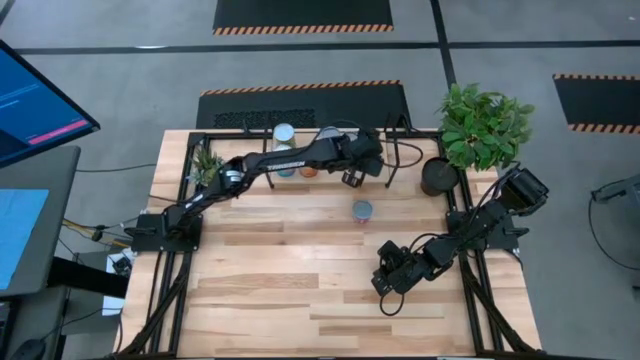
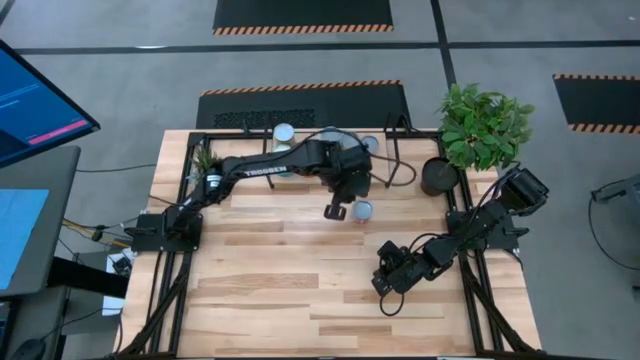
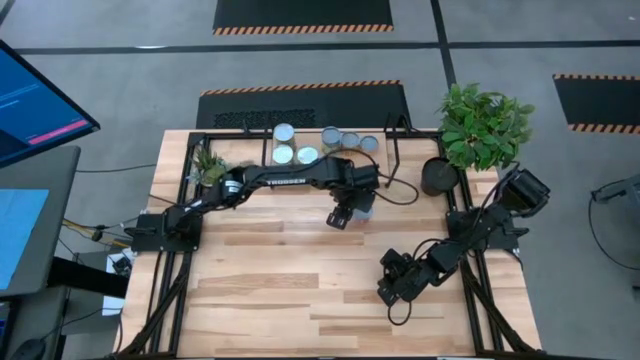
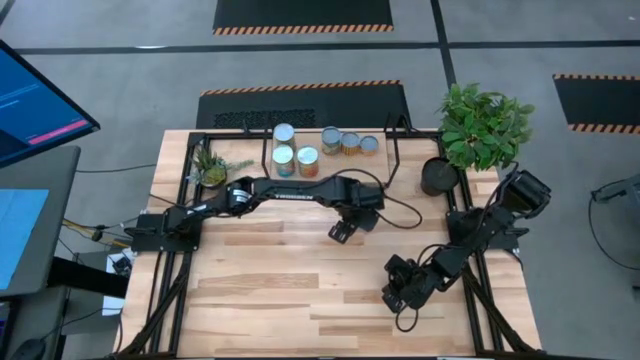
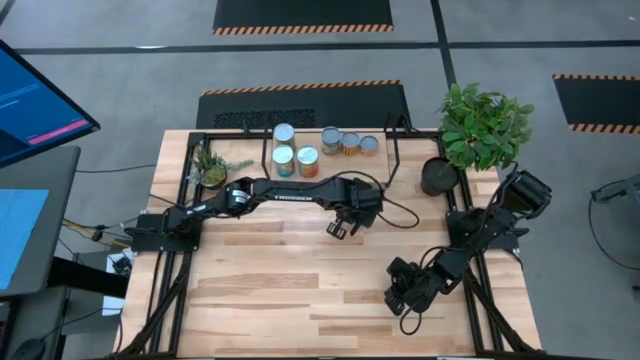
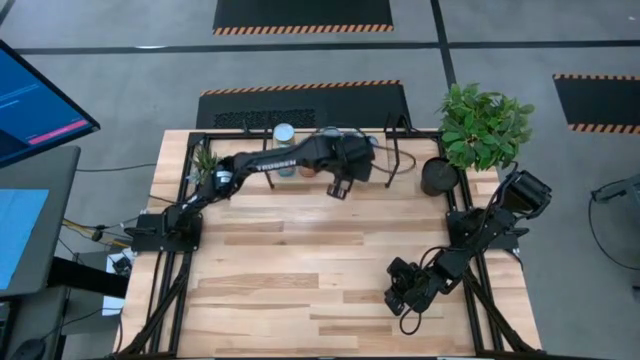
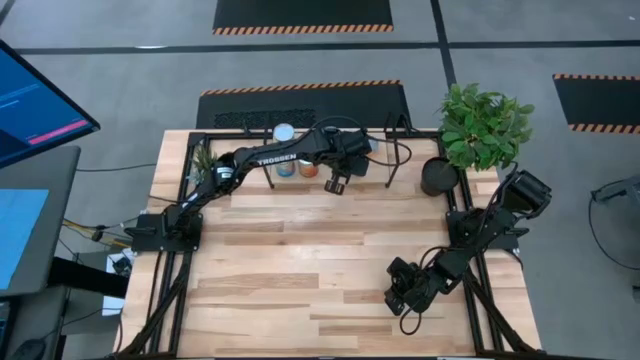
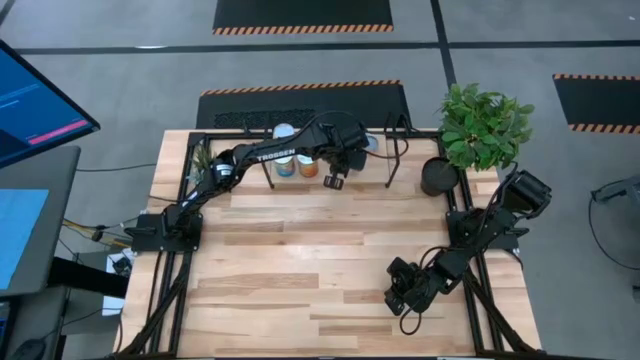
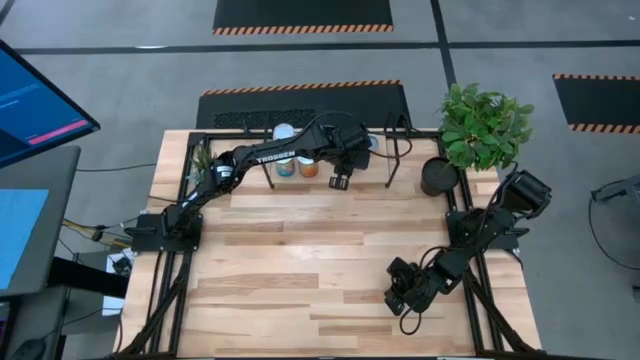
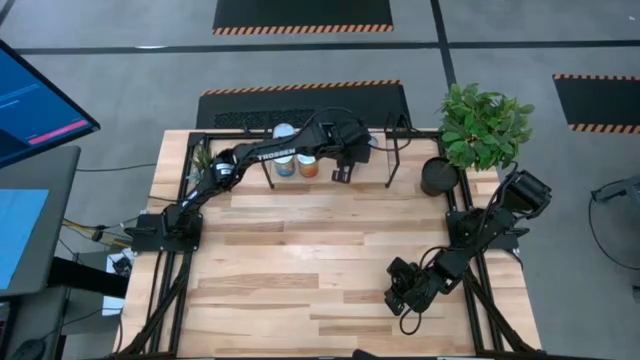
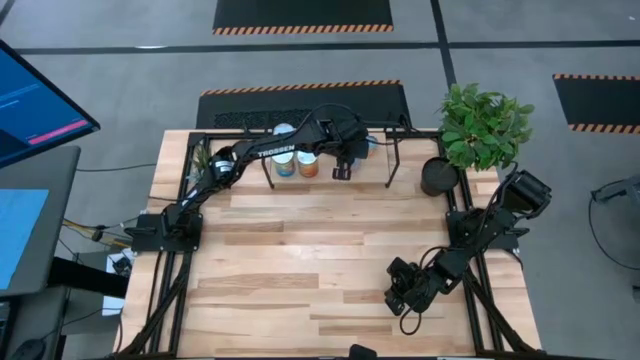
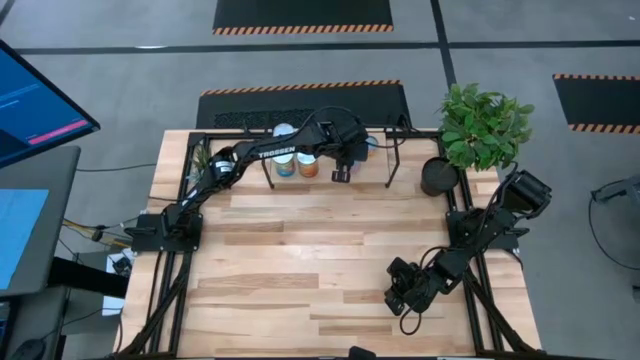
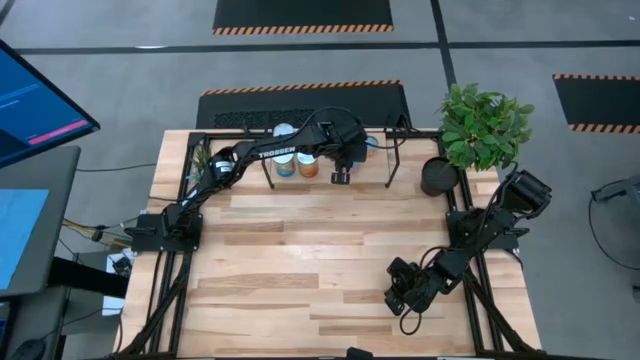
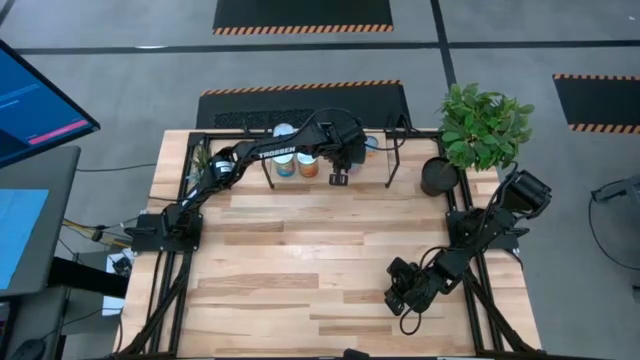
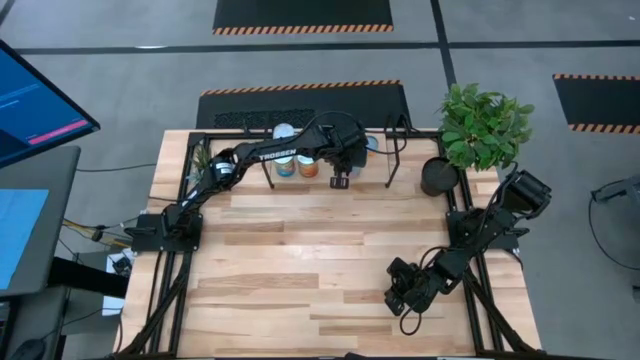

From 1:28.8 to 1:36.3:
Task: Pick and place cans onto a shelf
Put the canned corn on the shelf

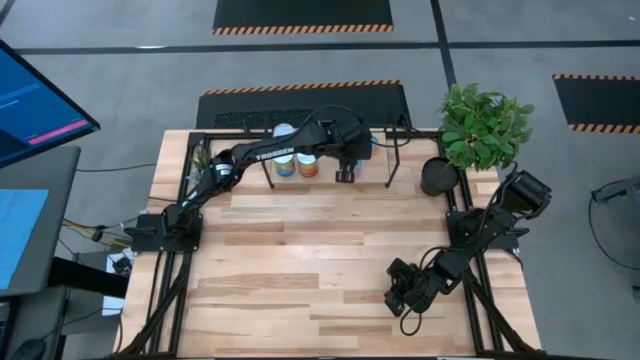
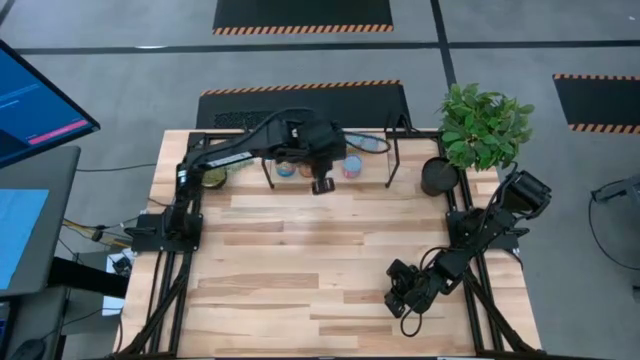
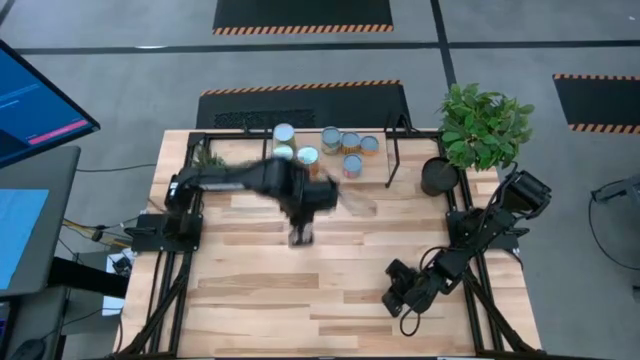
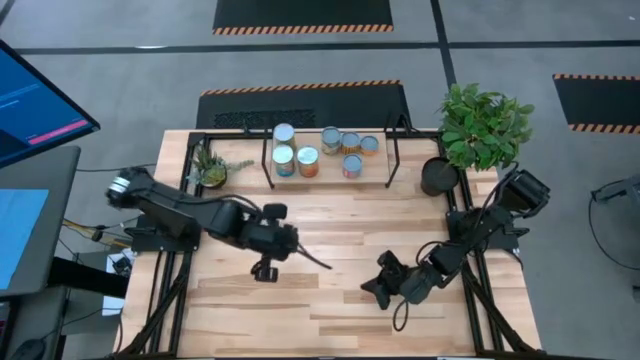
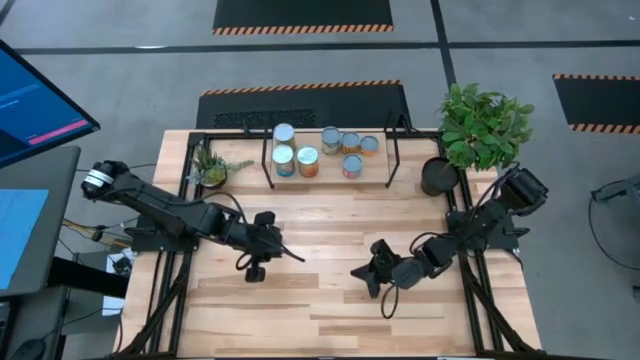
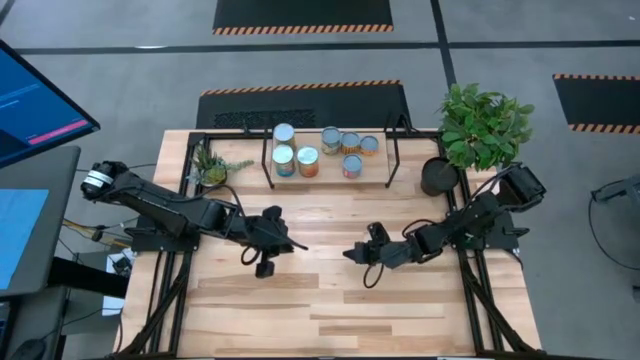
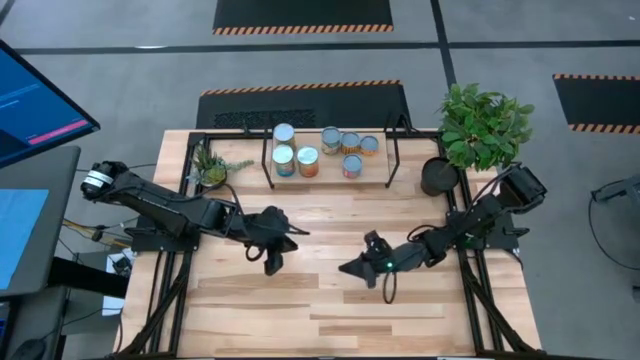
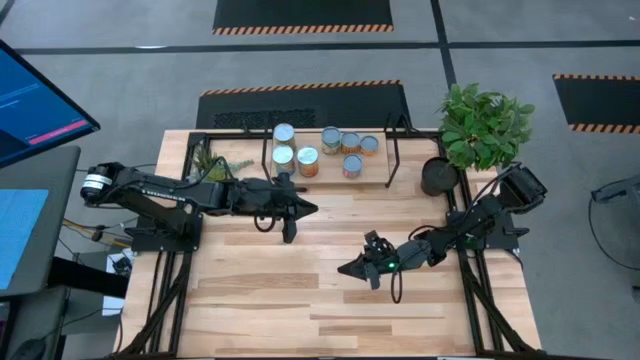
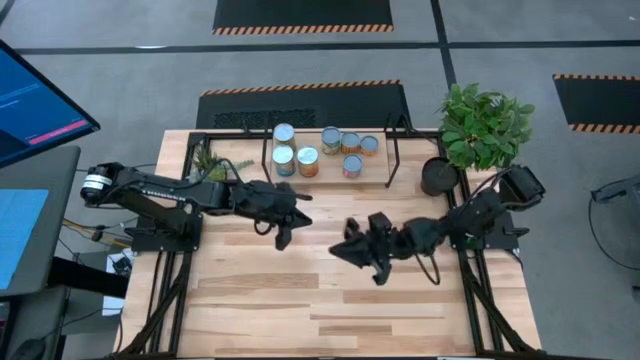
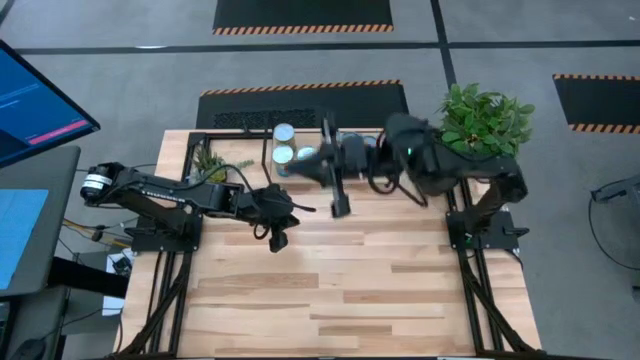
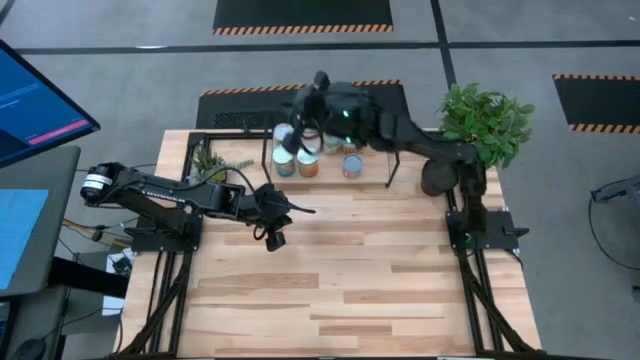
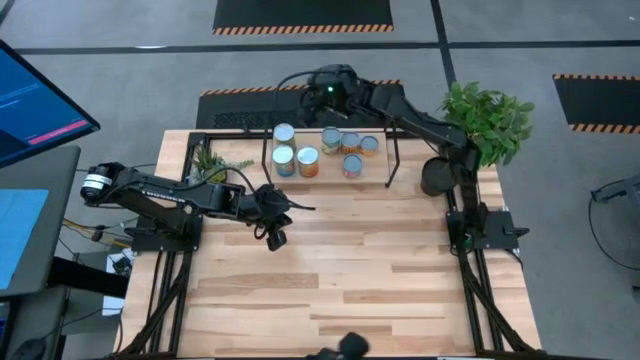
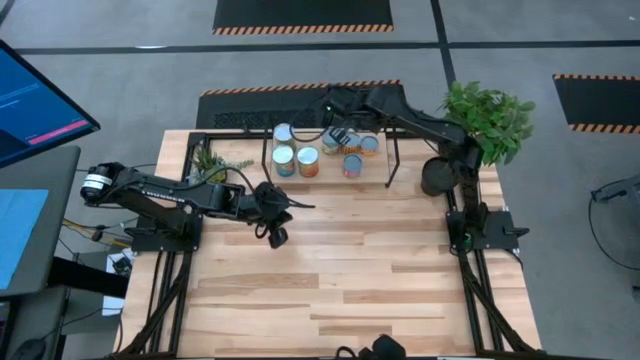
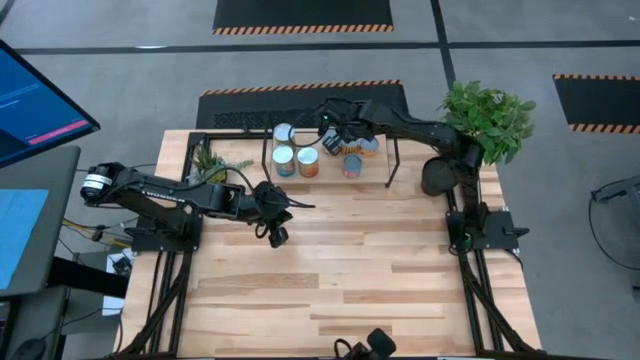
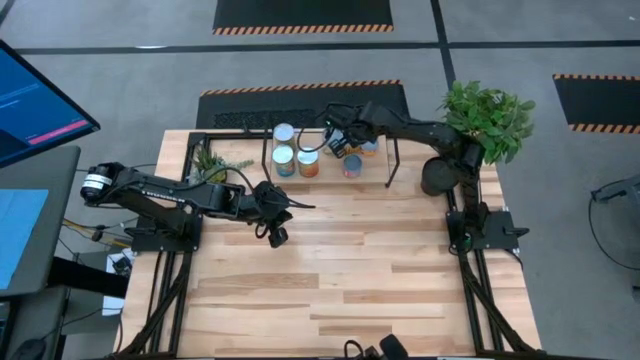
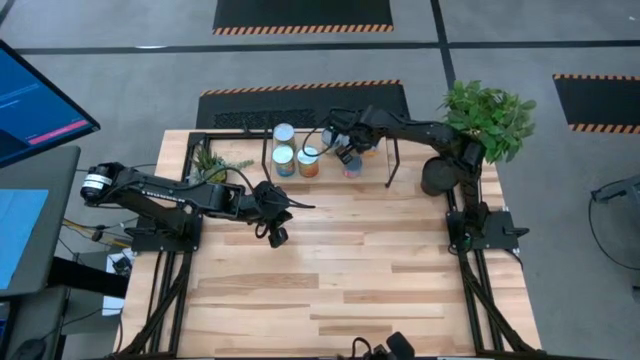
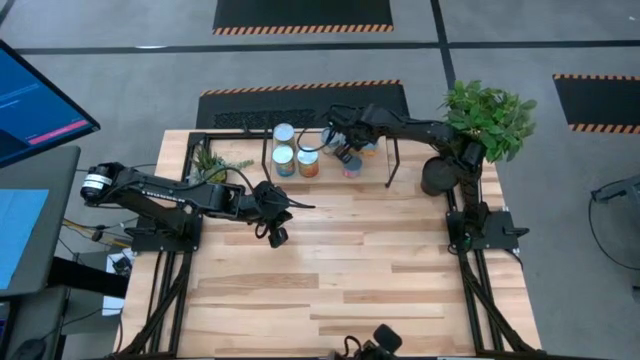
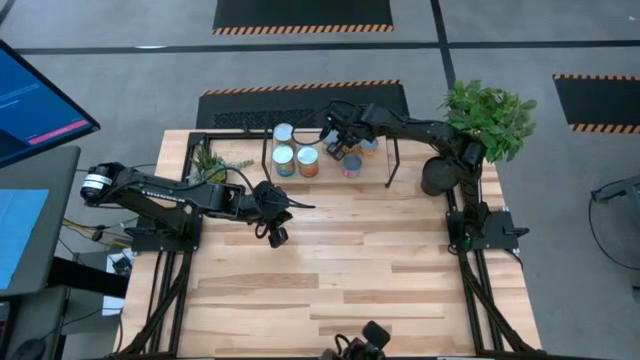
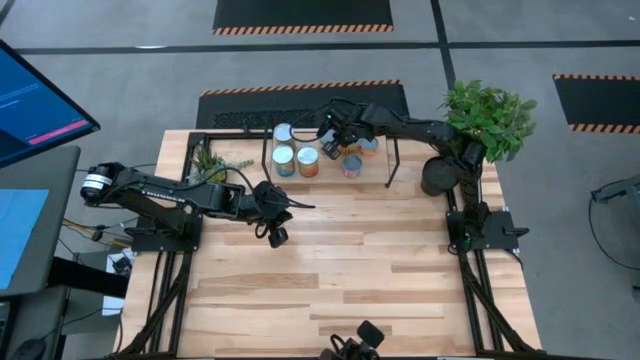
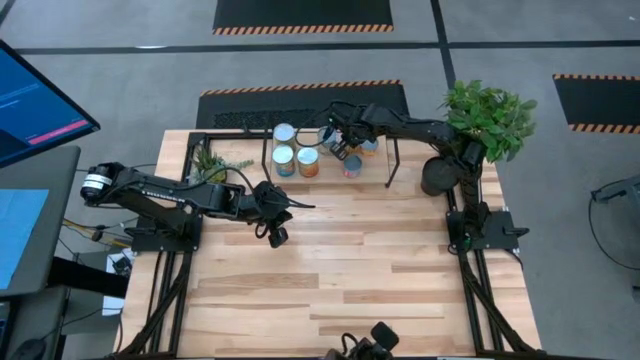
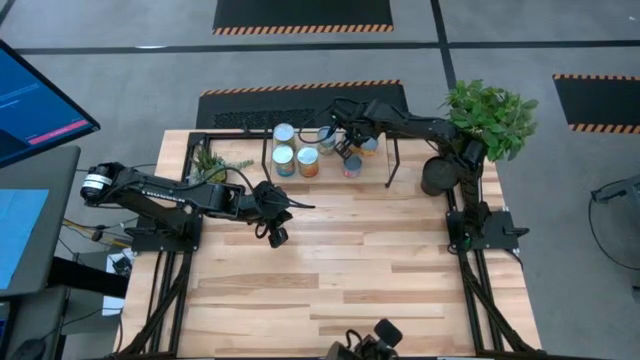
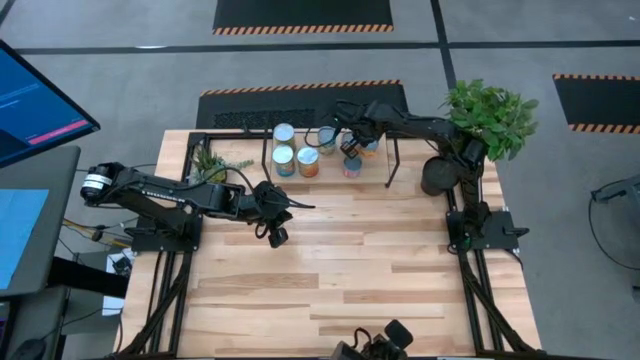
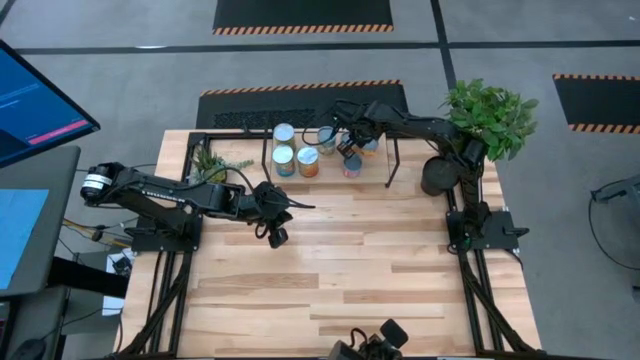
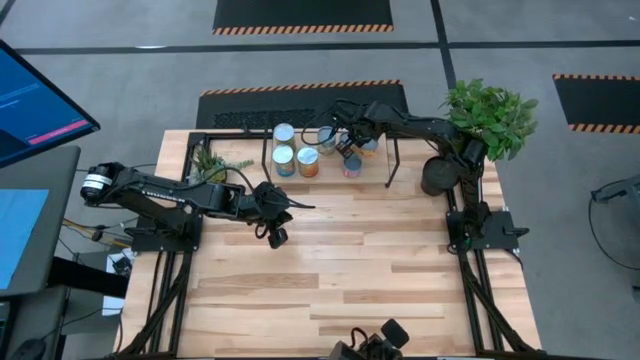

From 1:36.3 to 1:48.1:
Adjust the canned goods on the shelf

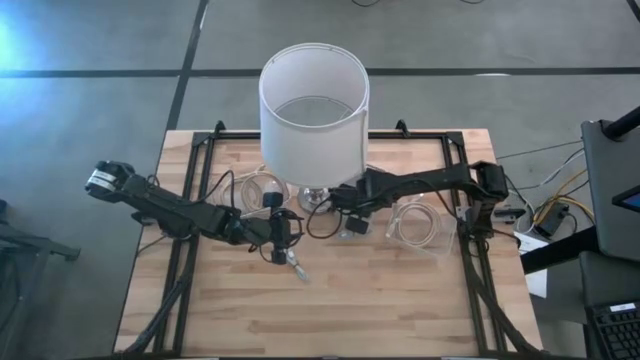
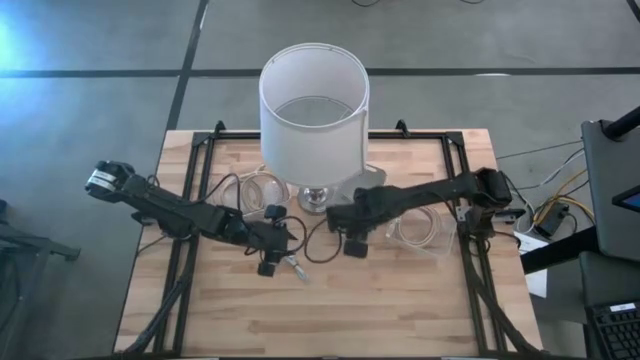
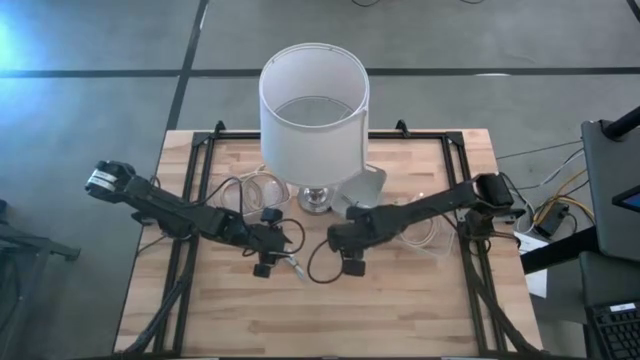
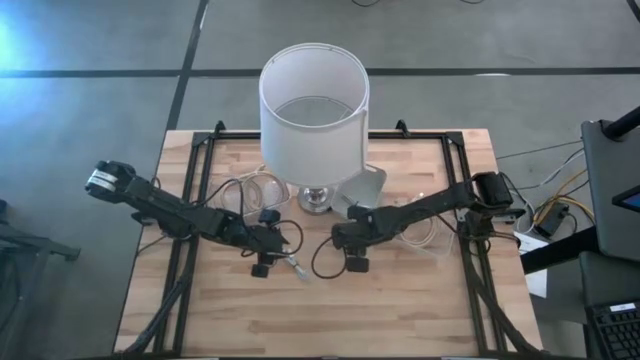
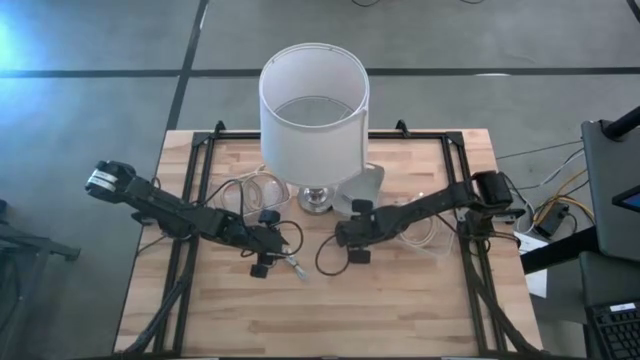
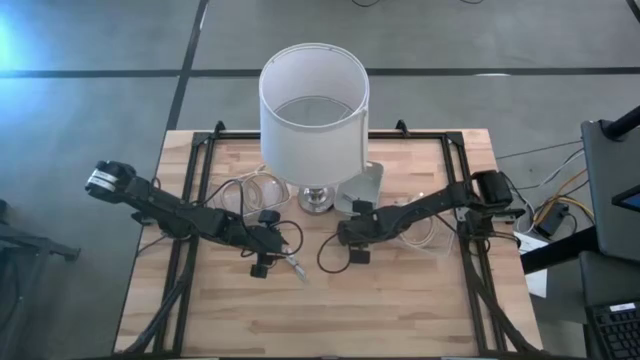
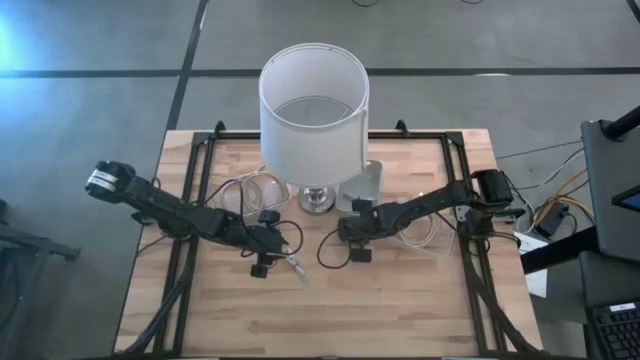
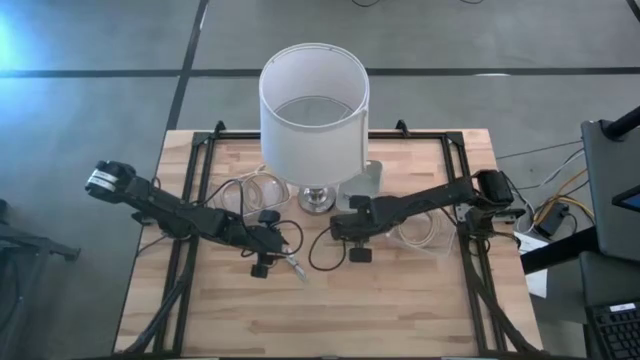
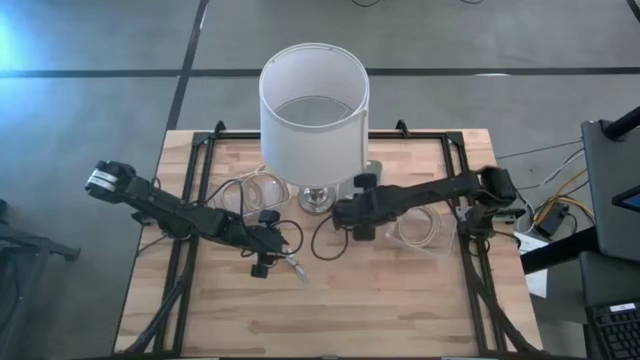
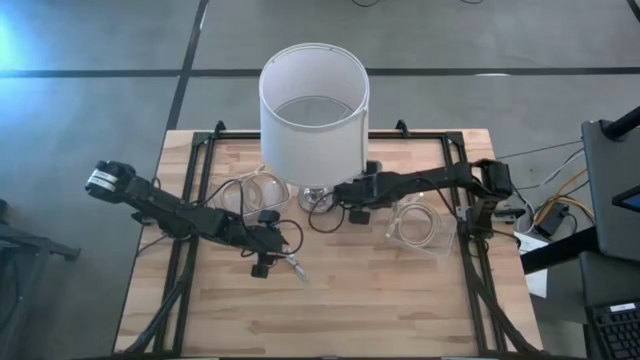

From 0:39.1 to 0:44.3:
Task: Pick & Place USB Port
Put the right blue charger cable into the gray bin
